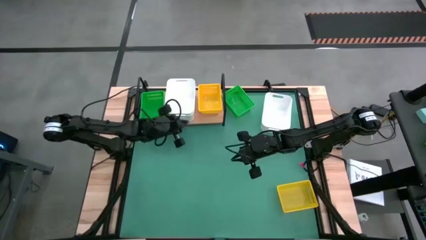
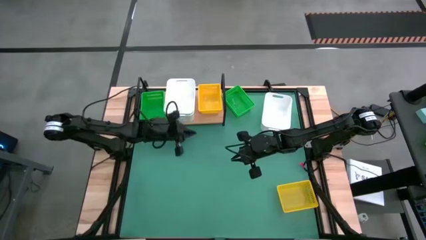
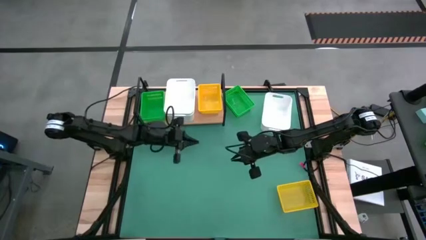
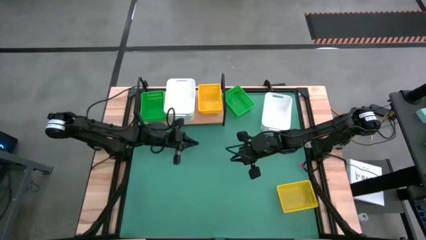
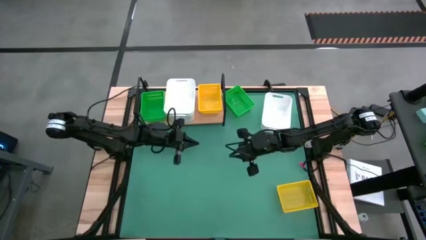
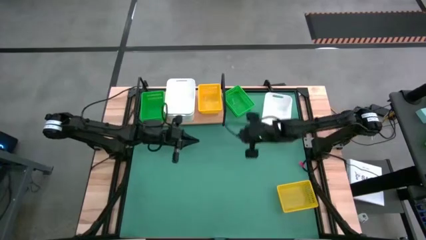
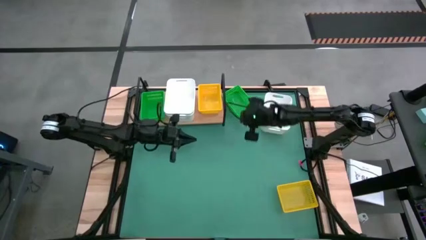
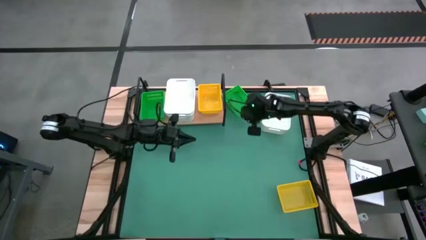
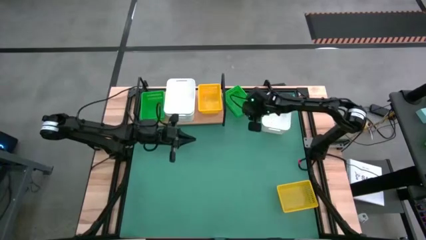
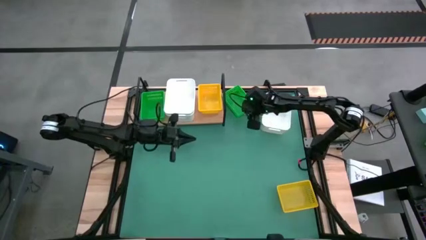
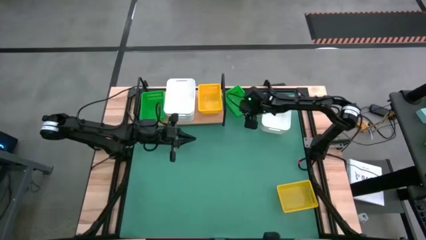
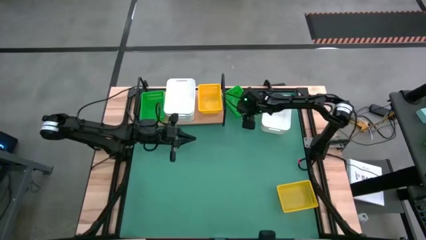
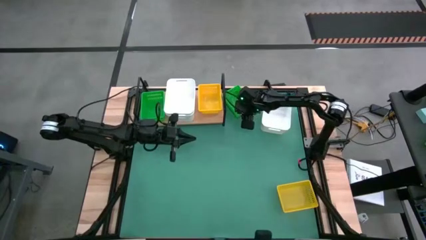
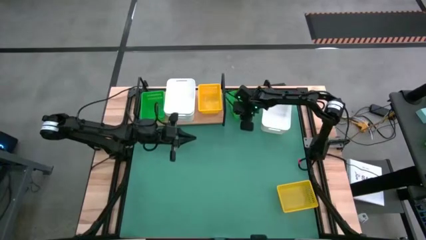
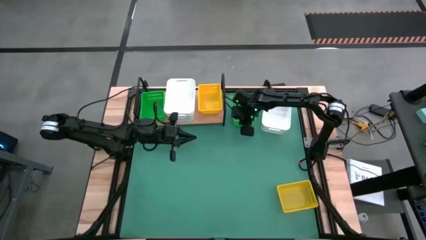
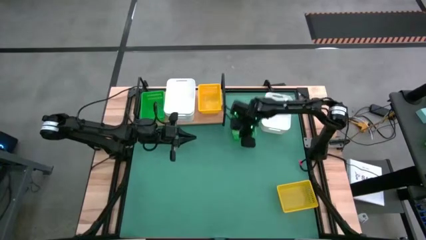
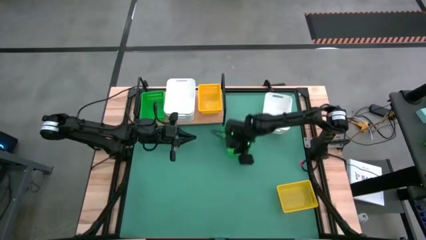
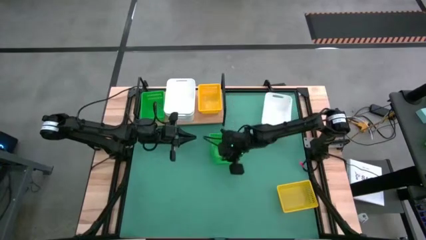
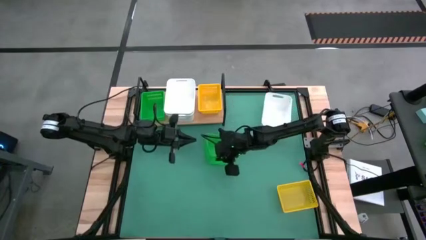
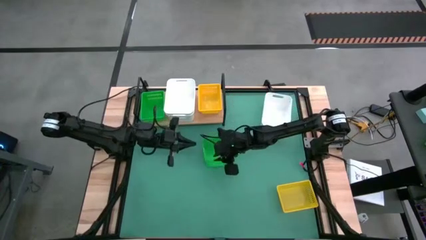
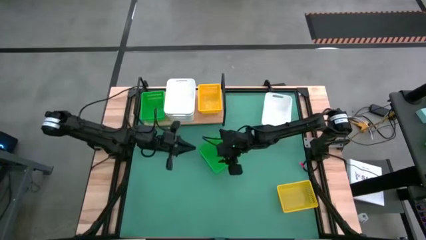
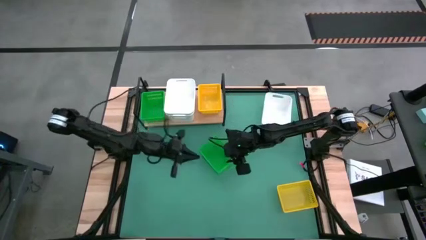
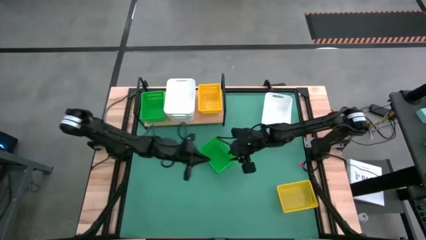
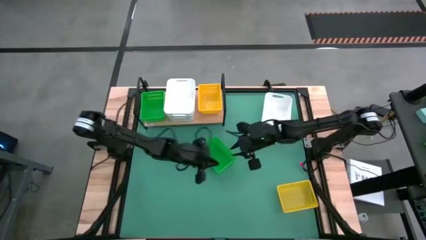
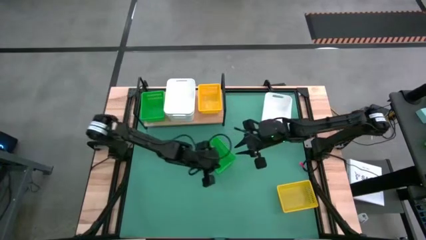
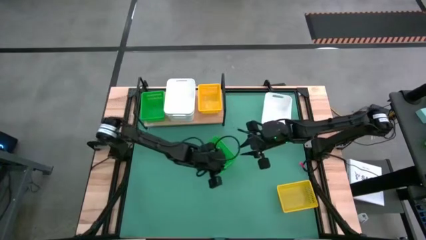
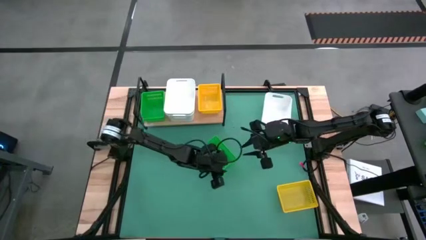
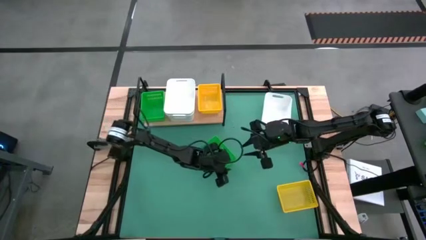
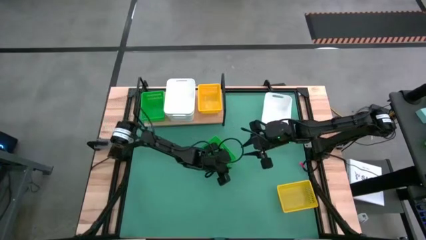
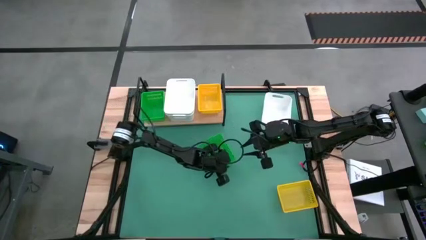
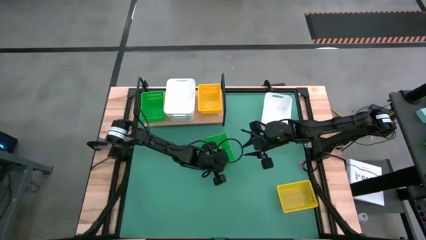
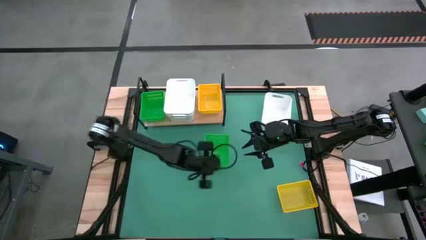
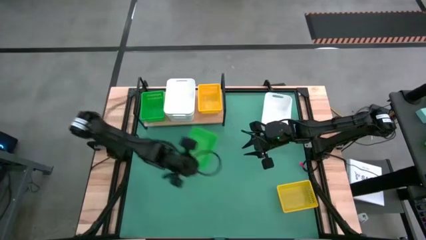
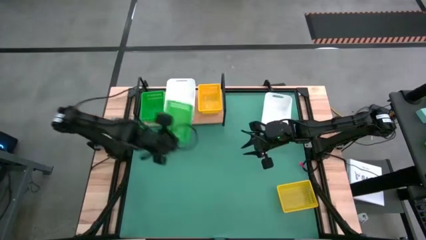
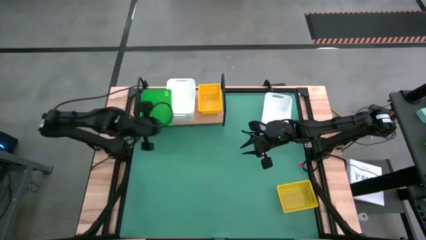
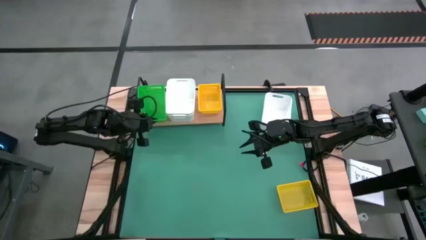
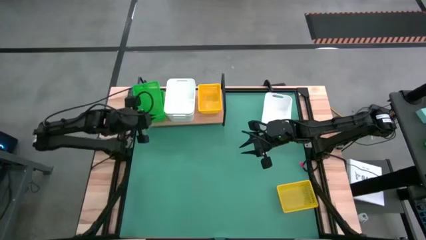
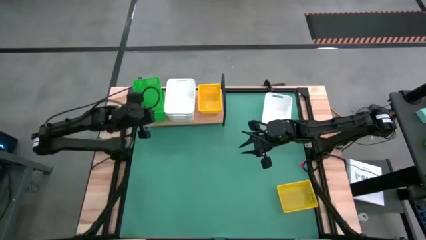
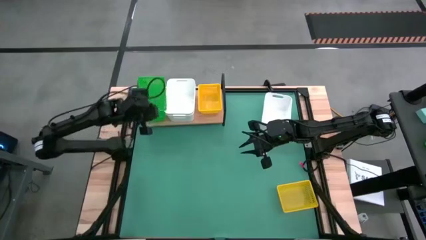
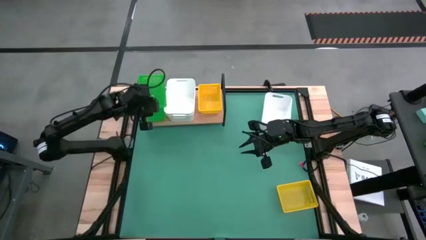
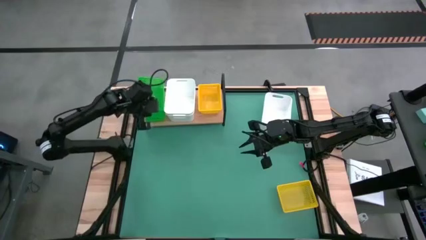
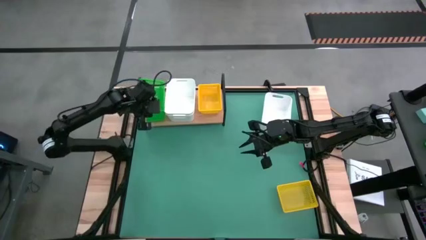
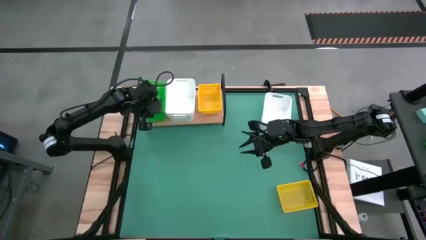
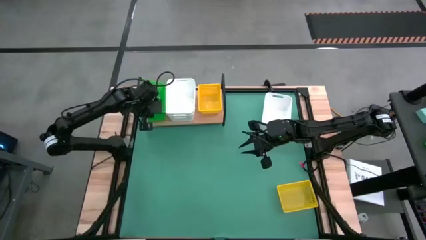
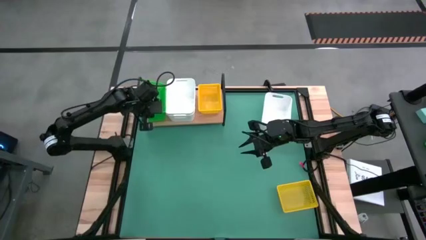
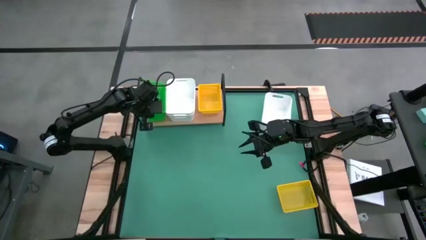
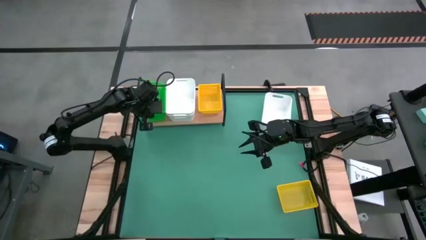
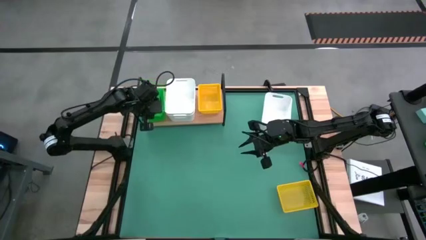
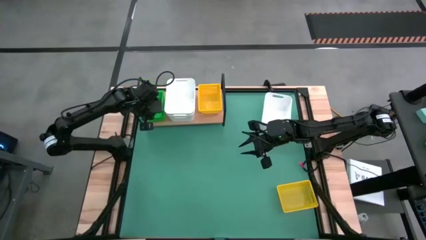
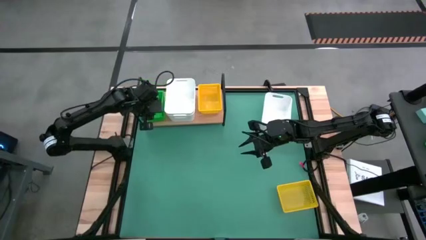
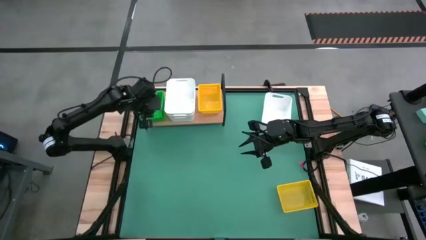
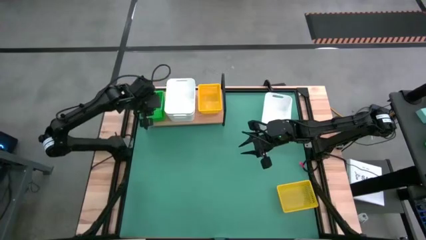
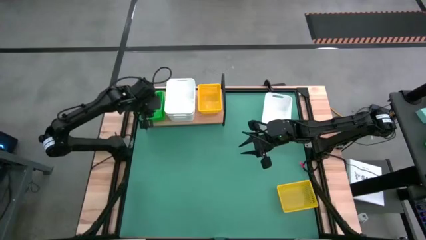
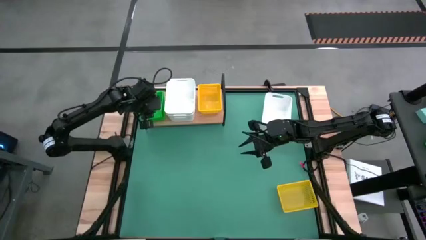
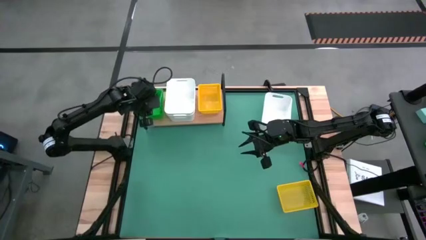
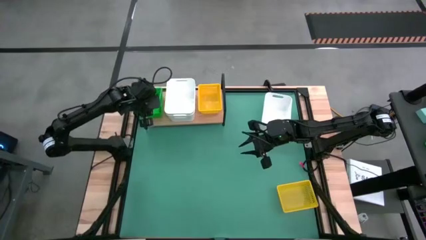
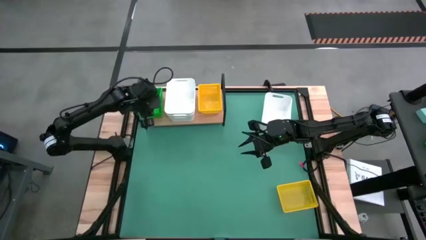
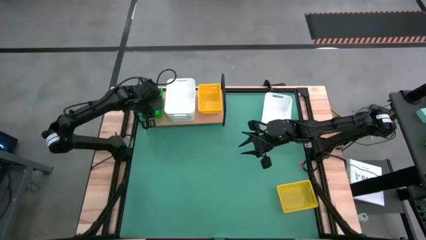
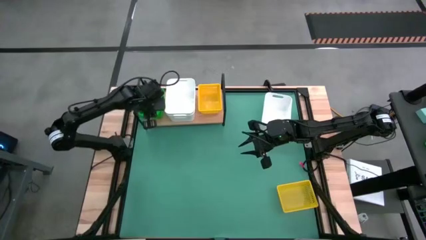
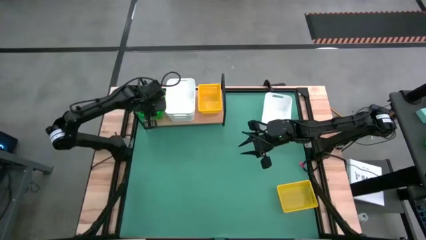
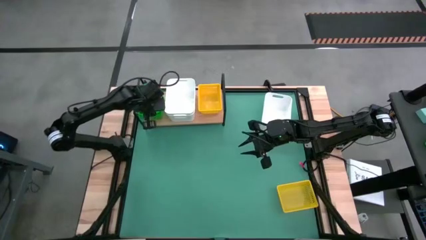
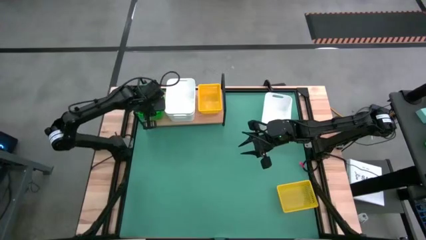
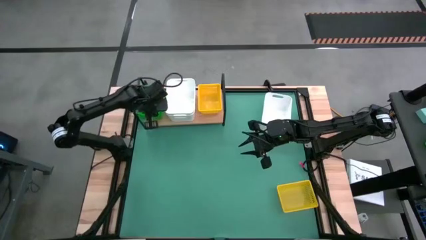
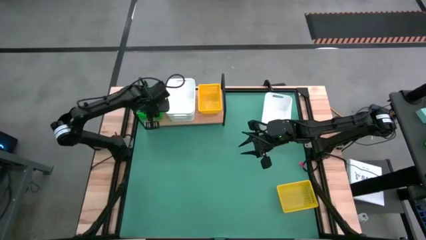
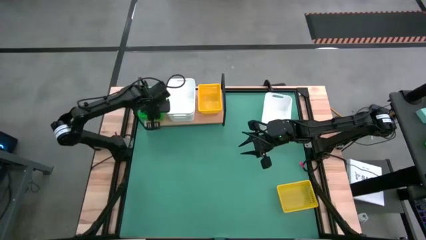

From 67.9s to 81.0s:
Task: Stack baskets on shelf by color
Stack the green bin on the top of the green bin on the shelf

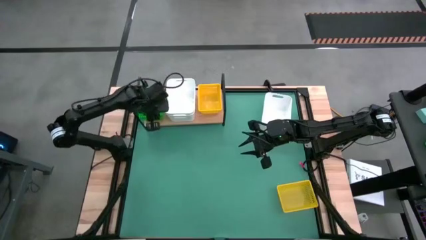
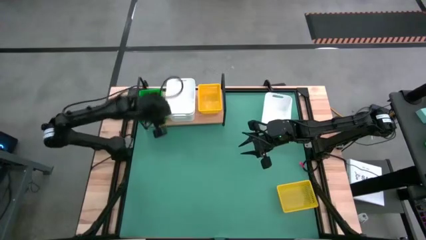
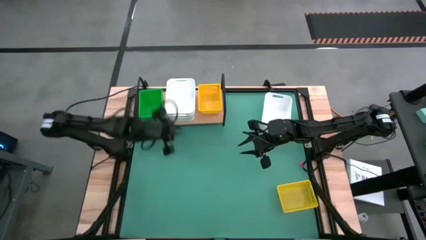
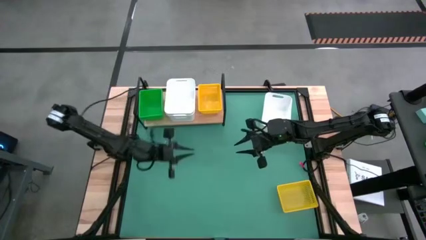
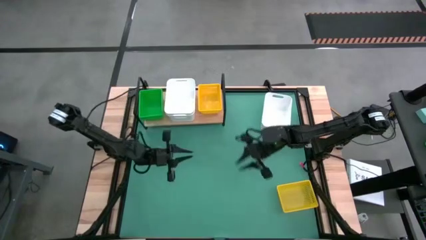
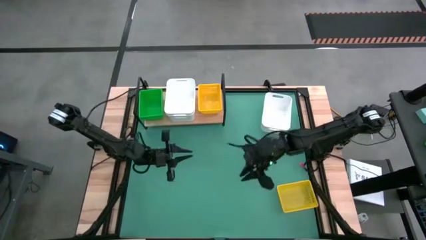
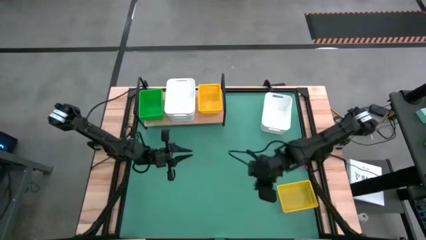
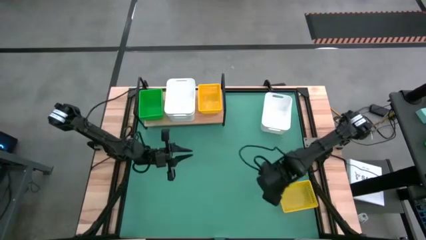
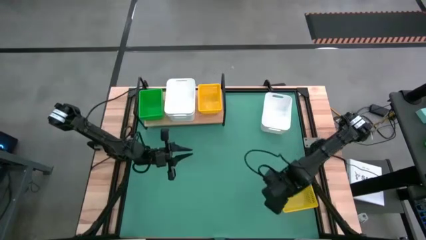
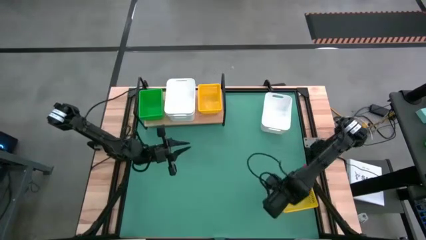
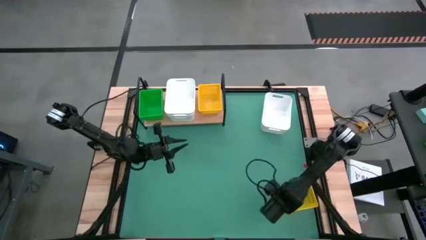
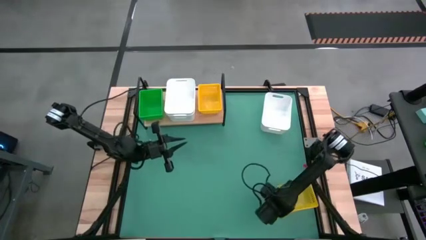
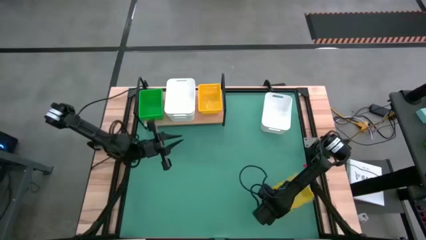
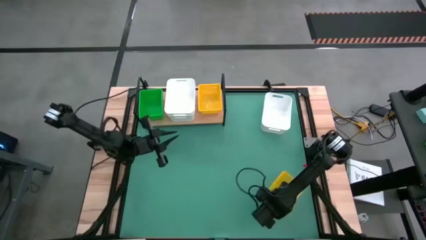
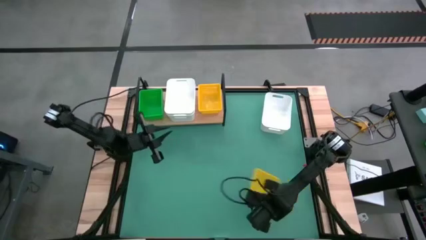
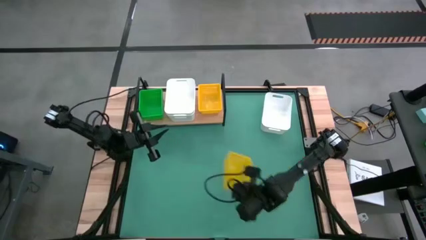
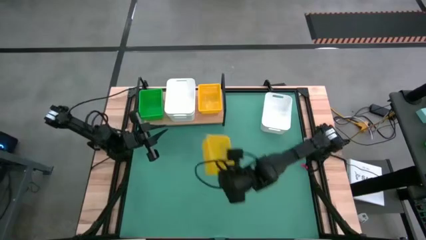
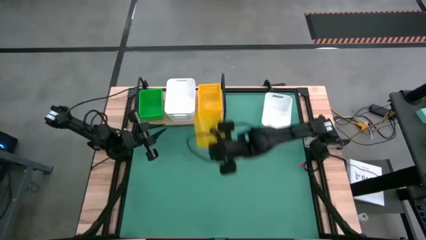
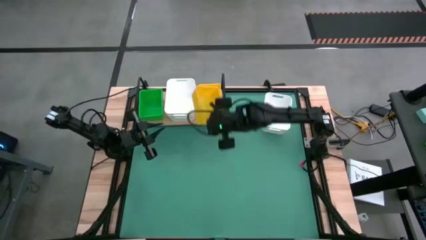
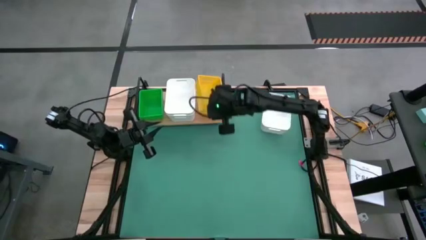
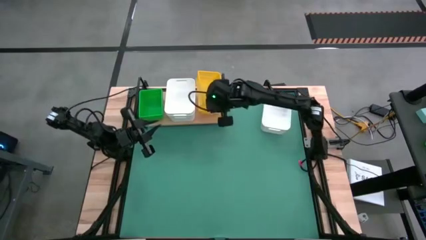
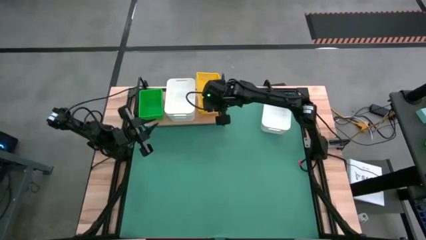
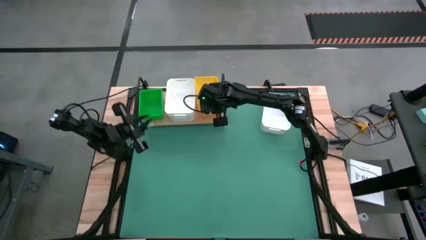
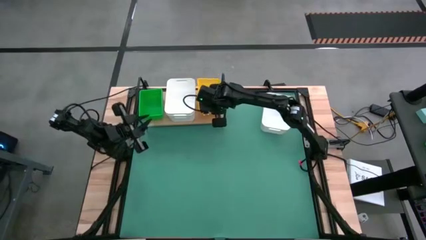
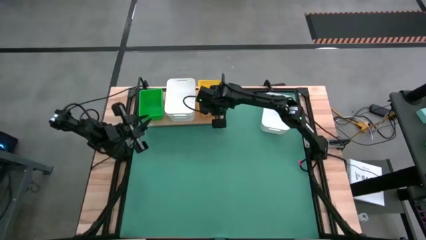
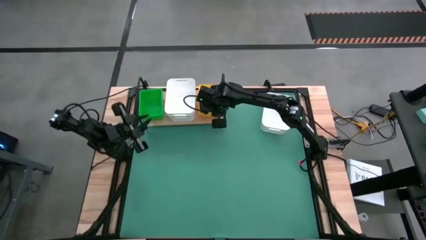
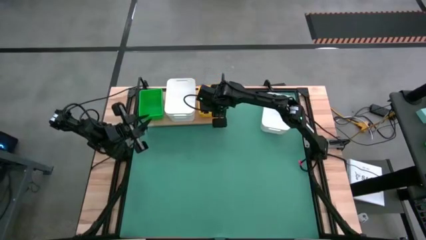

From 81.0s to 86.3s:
Stack the yellow bin on the top of the yellow bin on the shelf
